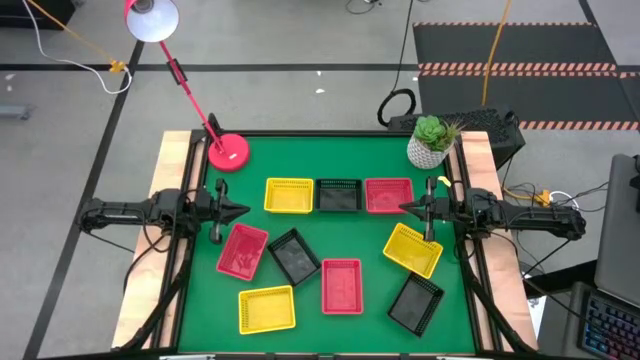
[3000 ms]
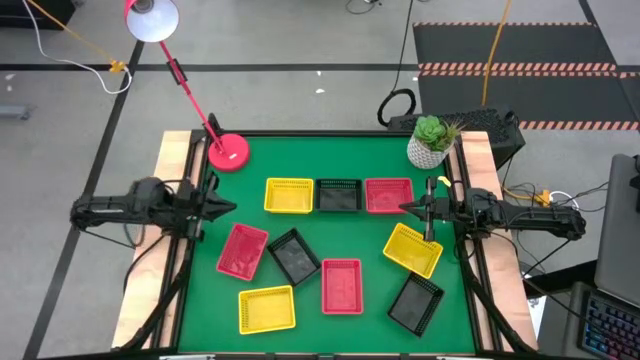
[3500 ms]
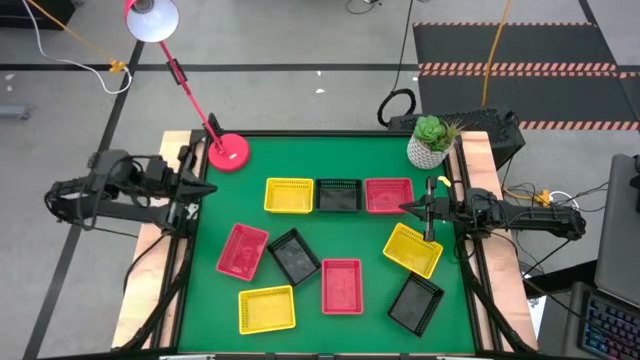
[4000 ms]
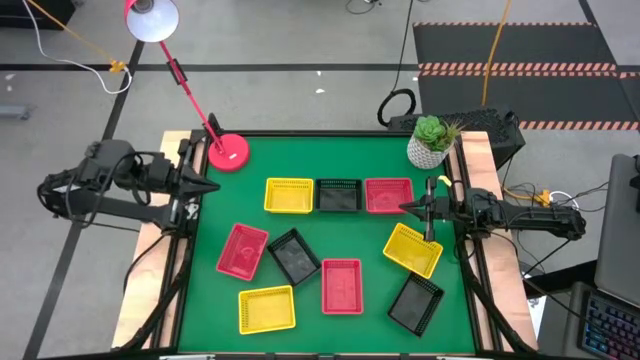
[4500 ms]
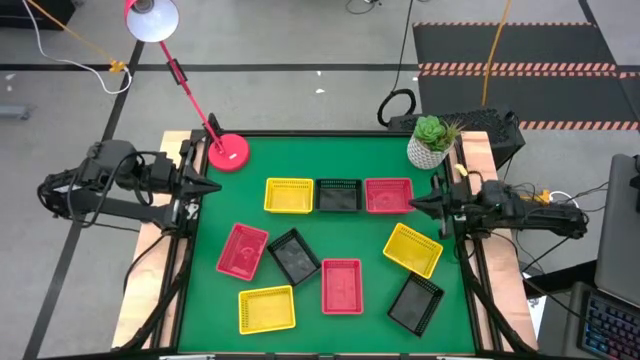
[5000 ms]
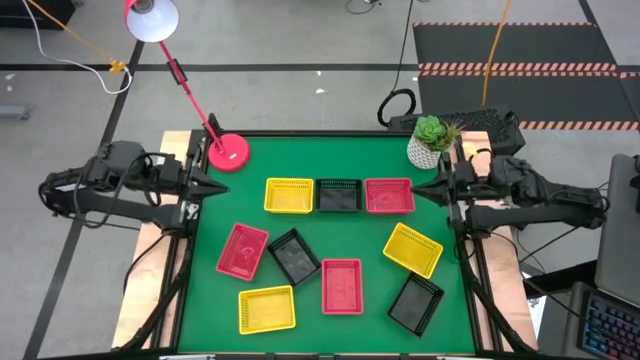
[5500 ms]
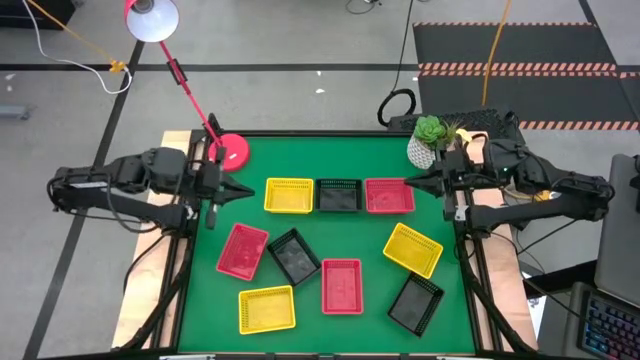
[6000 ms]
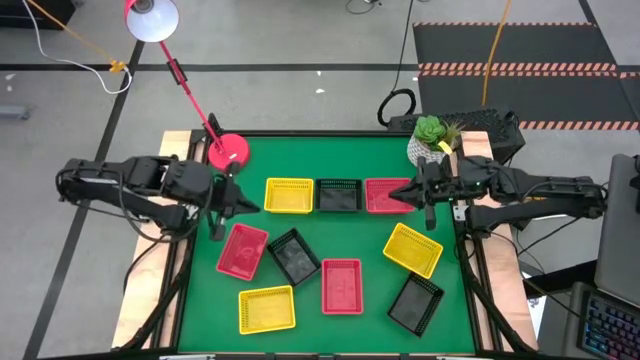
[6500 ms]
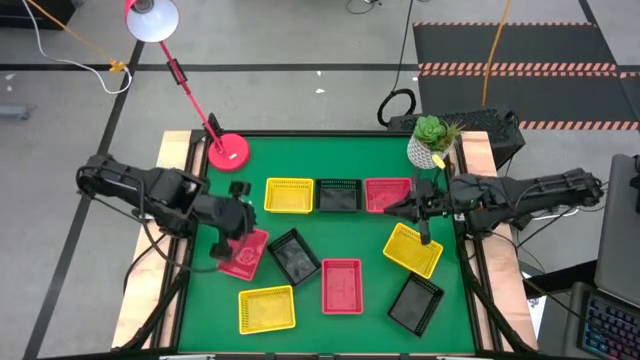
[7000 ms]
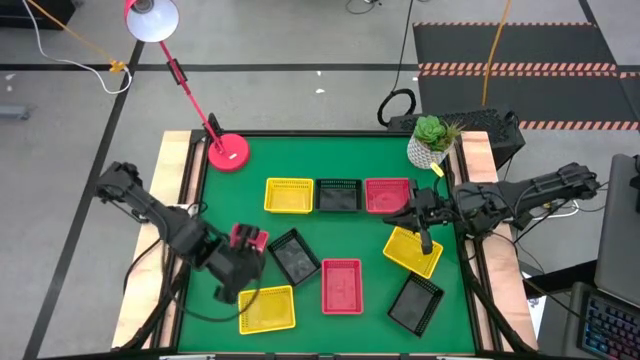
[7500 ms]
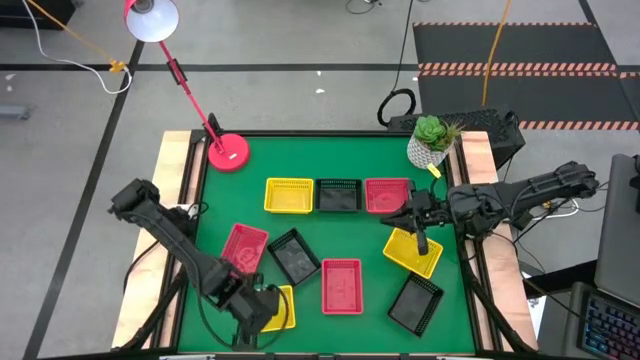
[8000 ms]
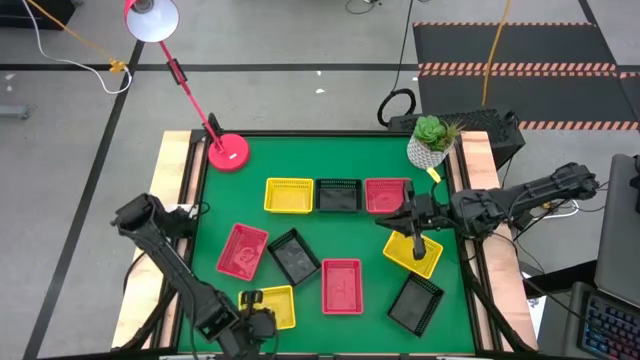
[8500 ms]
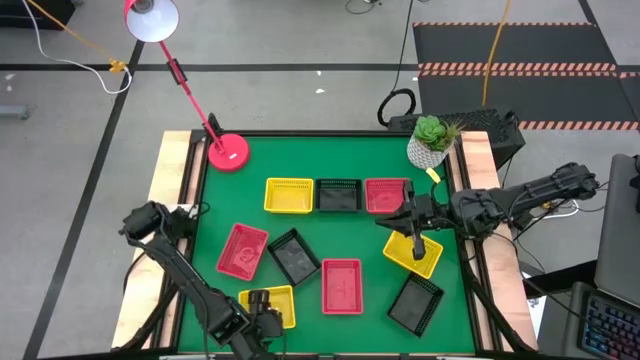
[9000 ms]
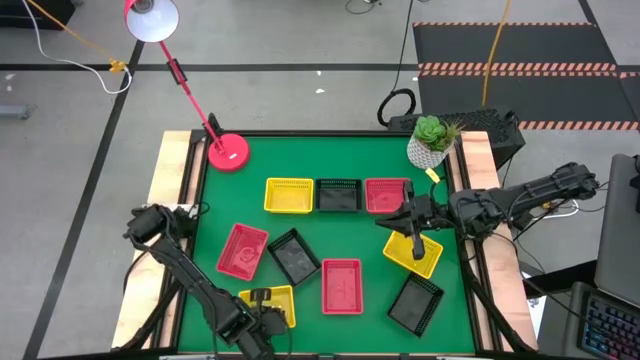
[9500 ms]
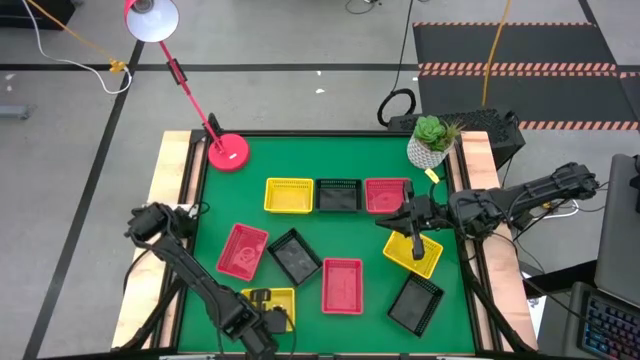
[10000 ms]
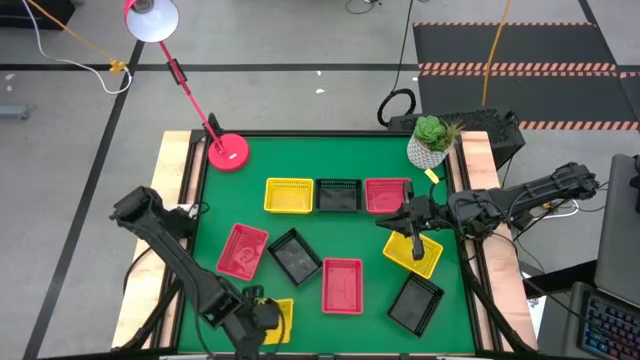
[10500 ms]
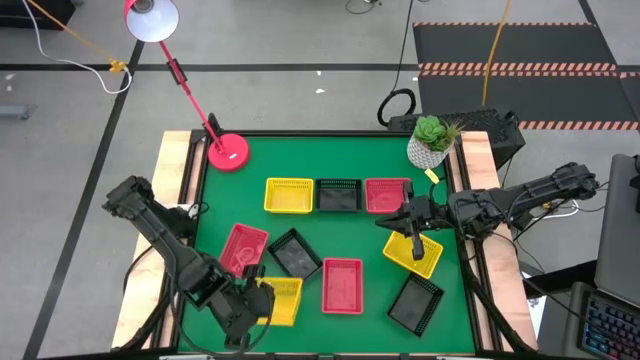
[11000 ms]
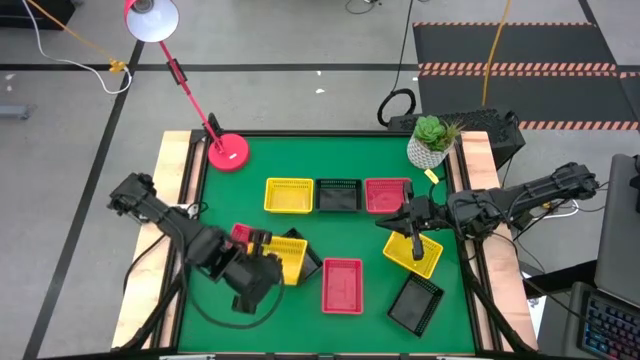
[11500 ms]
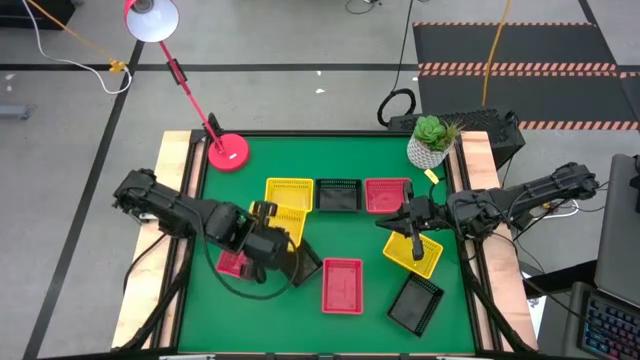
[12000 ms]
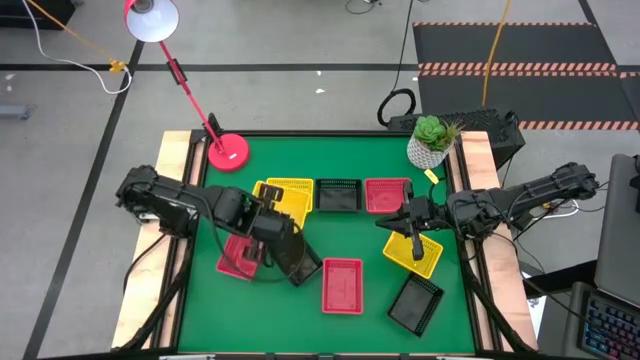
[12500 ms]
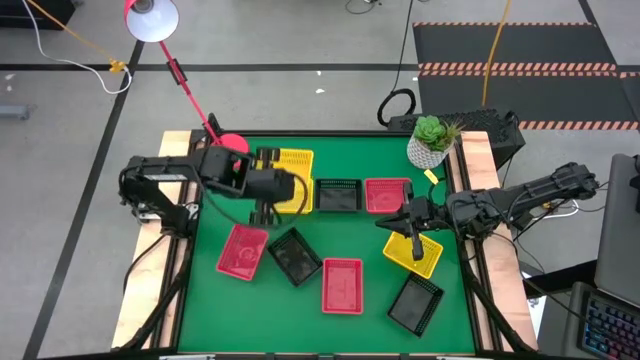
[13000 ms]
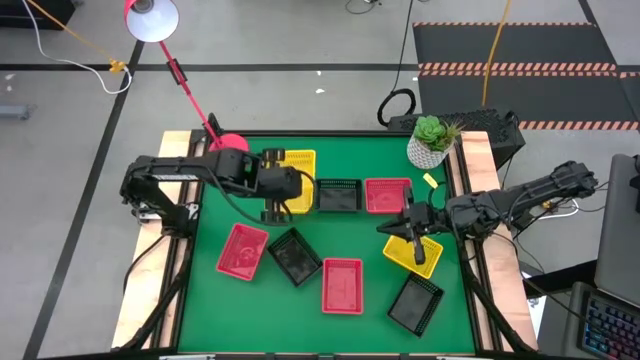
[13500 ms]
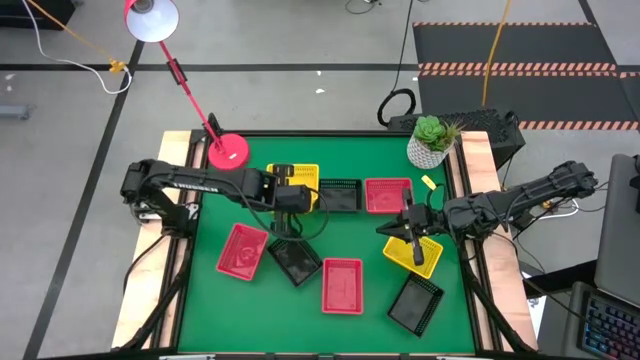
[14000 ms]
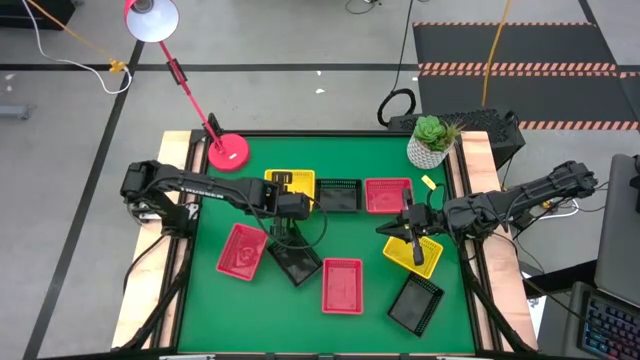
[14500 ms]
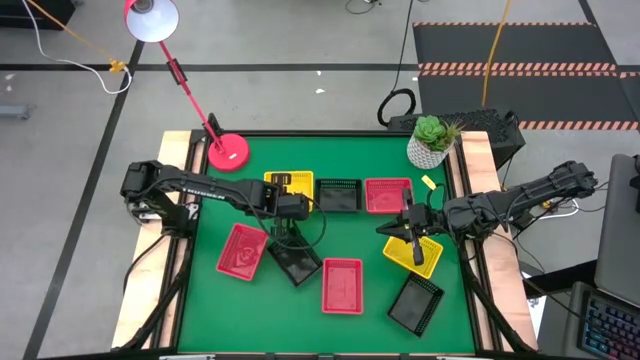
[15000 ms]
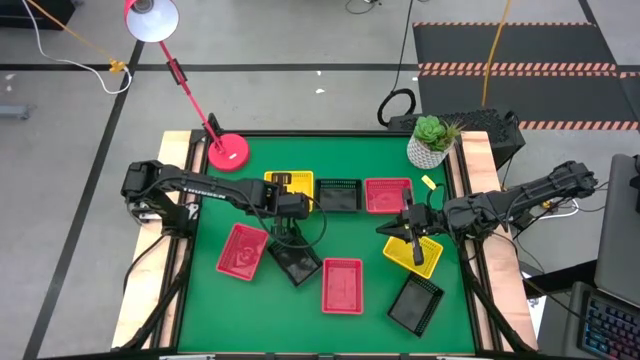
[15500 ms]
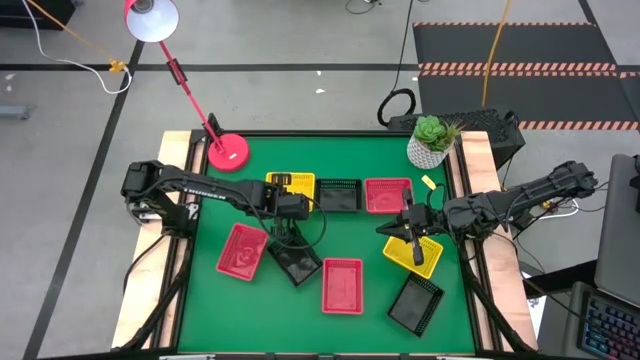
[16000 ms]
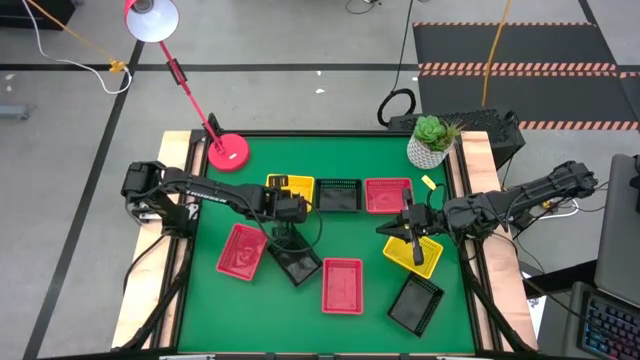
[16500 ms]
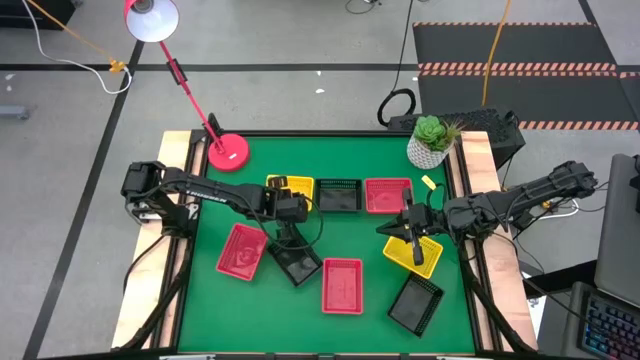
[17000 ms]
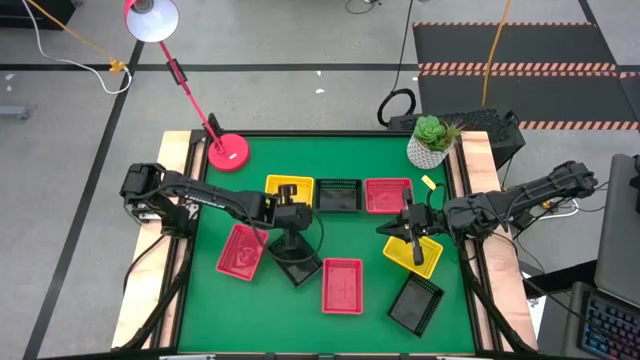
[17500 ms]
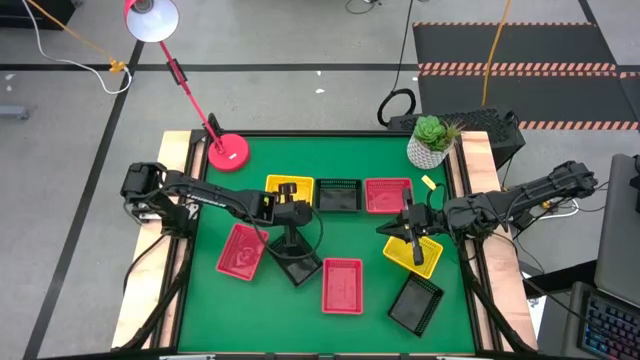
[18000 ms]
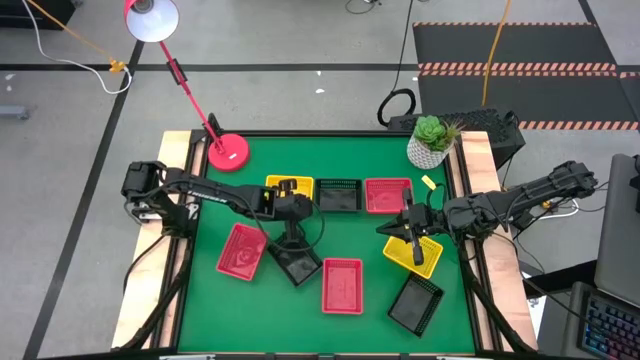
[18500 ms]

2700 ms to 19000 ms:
Stack the bottom left yellow bin on top of the top left yellow bin
